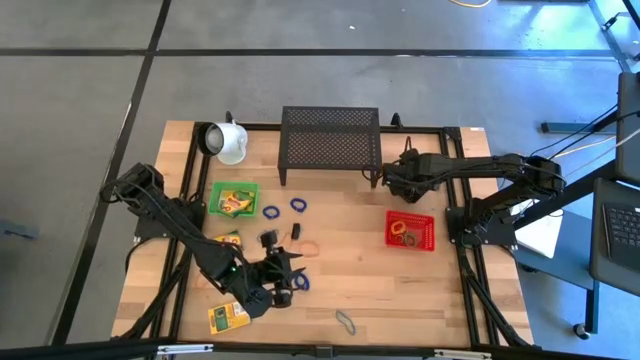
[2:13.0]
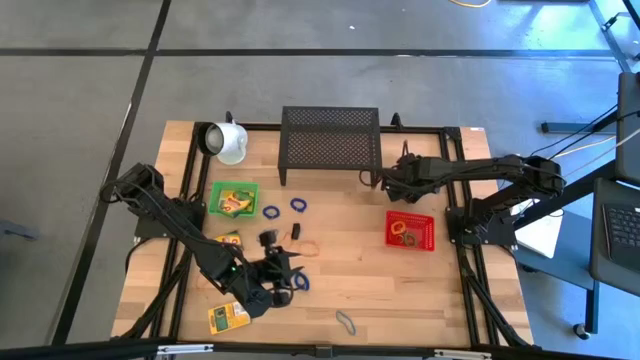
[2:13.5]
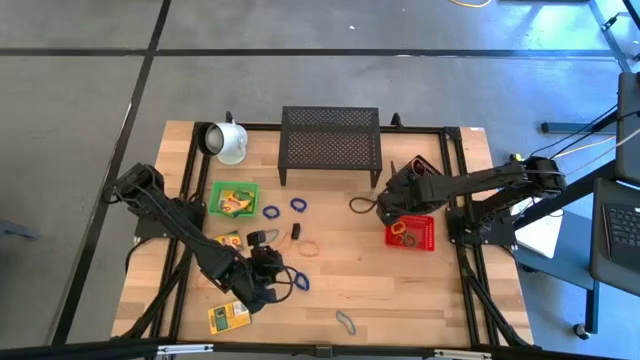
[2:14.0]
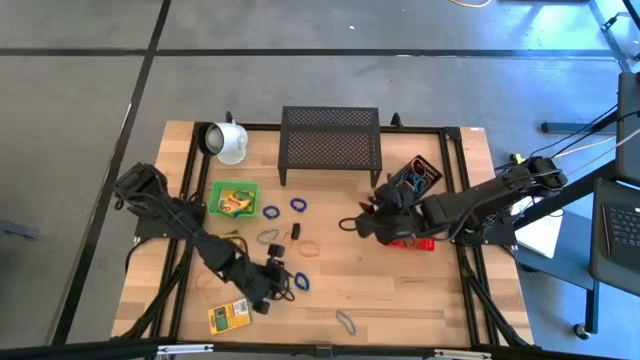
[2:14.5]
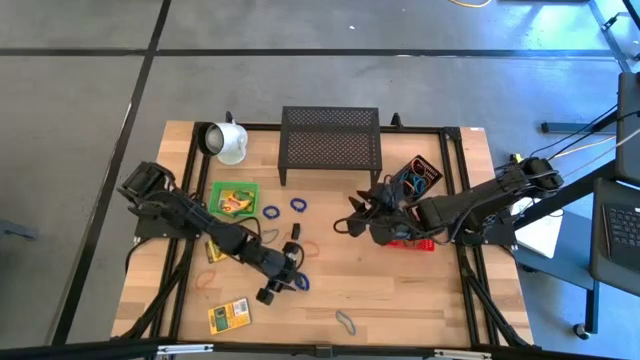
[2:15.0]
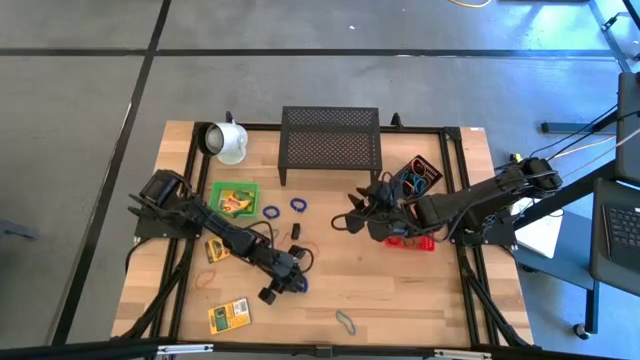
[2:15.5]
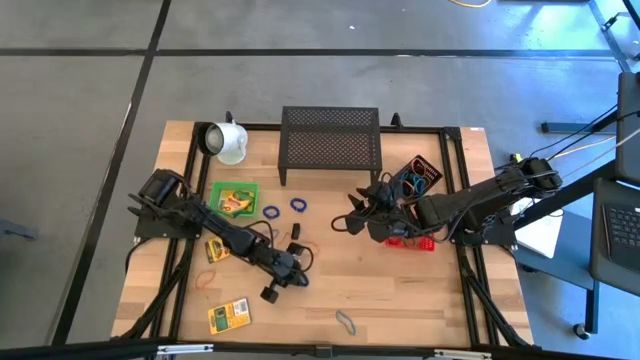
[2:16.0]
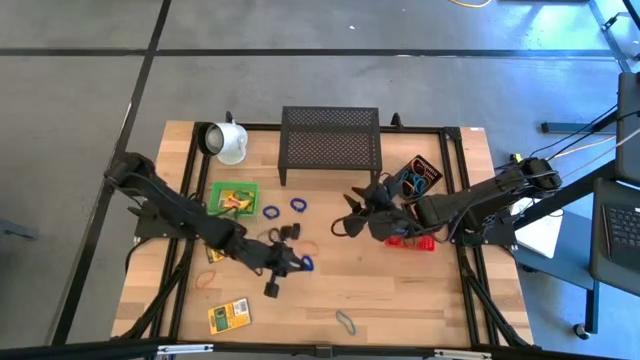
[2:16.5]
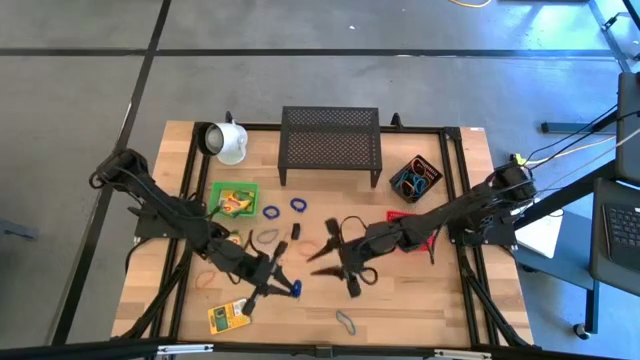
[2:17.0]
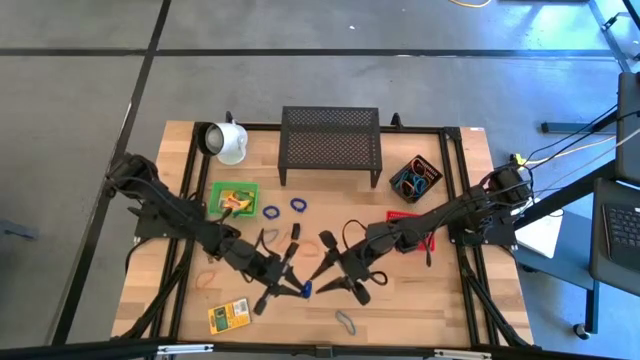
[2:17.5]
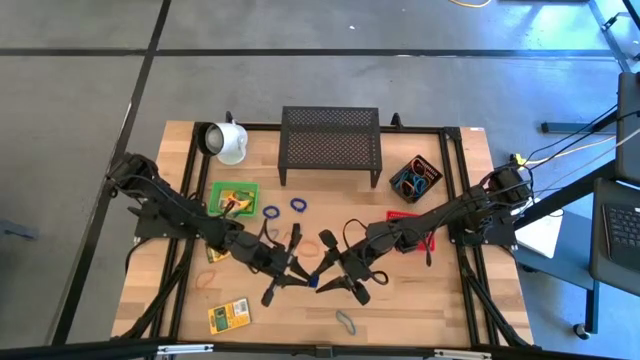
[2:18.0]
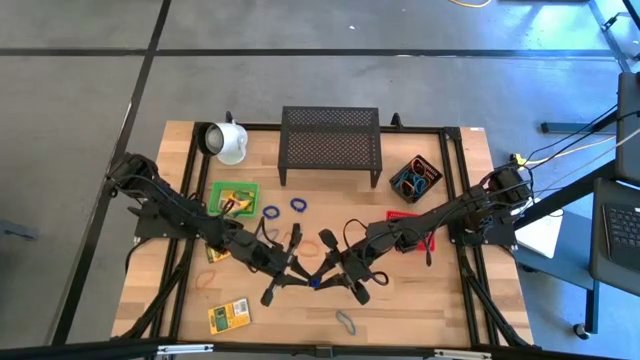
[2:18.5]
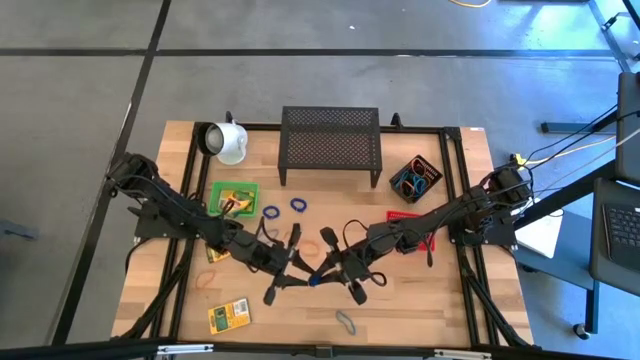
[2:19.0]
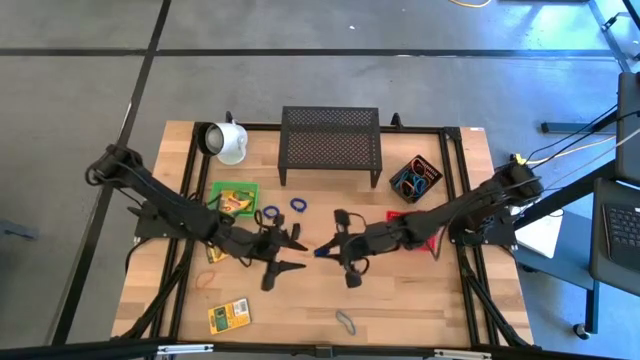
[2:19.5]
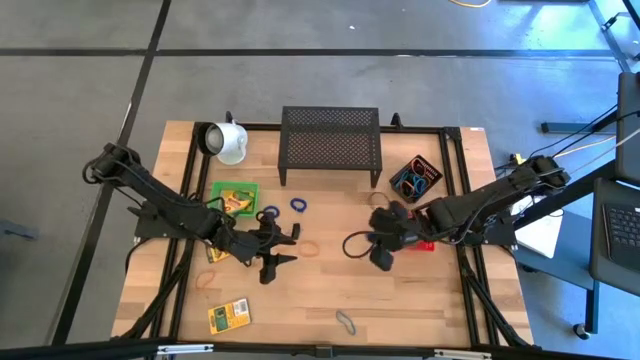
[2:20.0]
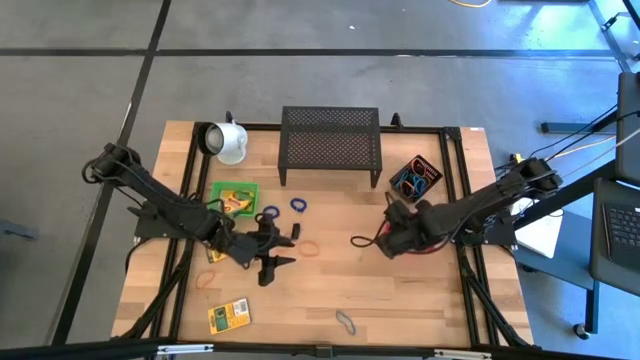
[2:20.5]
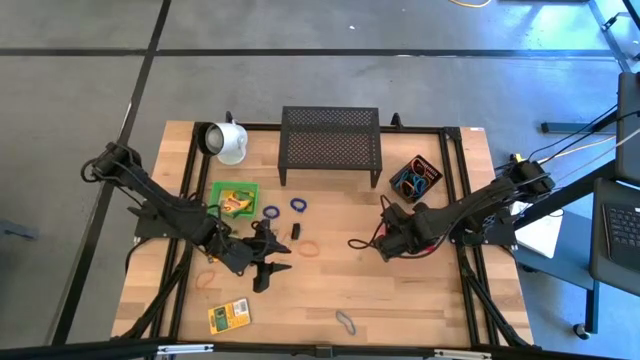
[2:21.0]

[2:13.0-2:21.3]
Task: Pick & Place Office Desk Supplies
Put the blue spring keychain into the orange bin

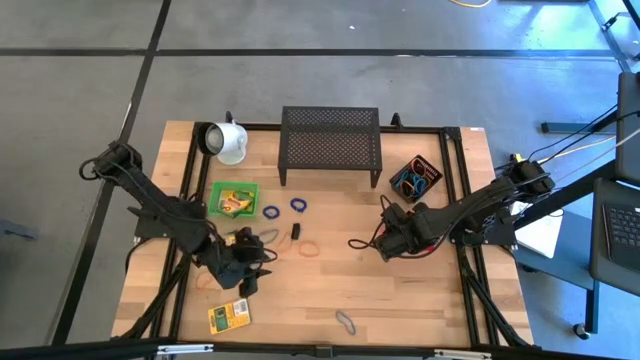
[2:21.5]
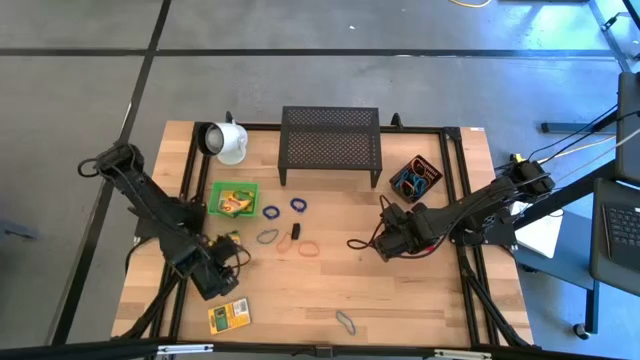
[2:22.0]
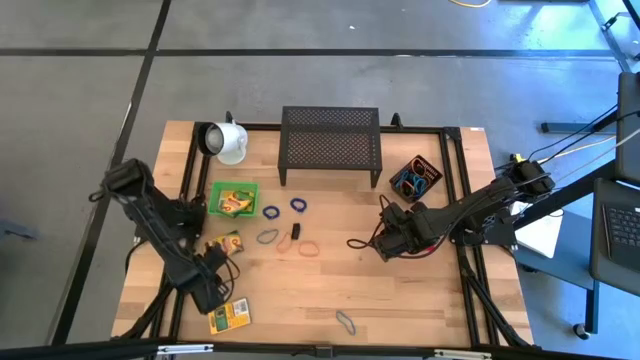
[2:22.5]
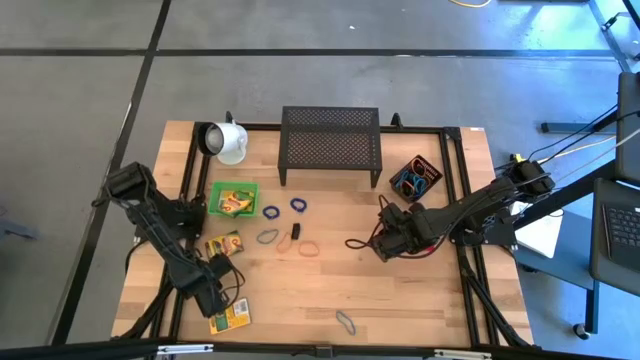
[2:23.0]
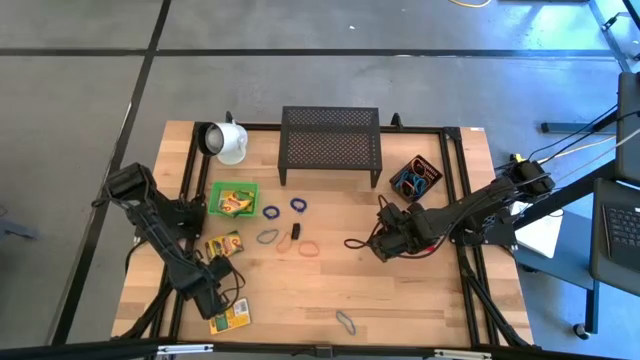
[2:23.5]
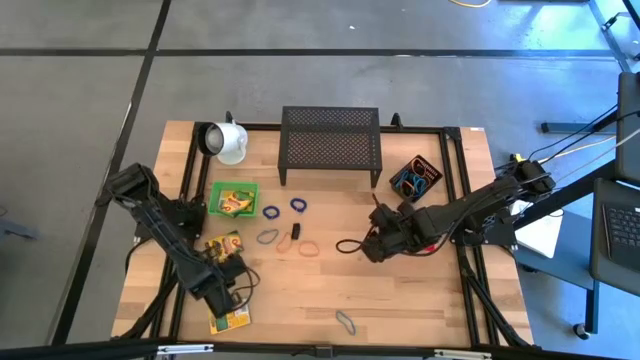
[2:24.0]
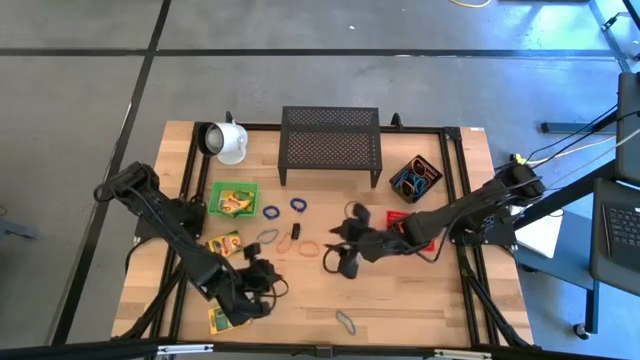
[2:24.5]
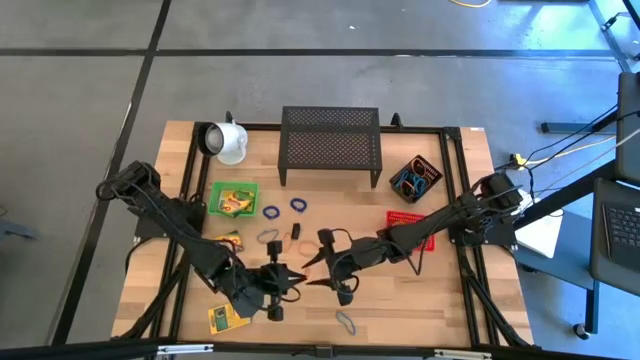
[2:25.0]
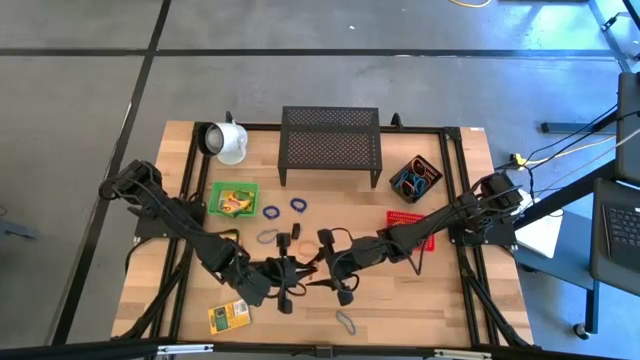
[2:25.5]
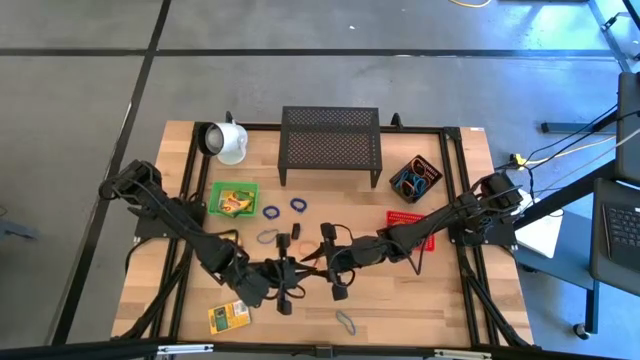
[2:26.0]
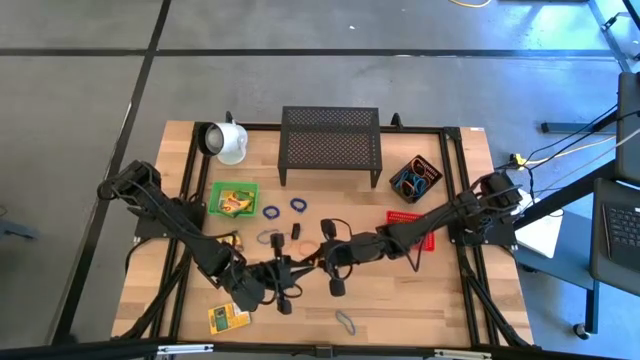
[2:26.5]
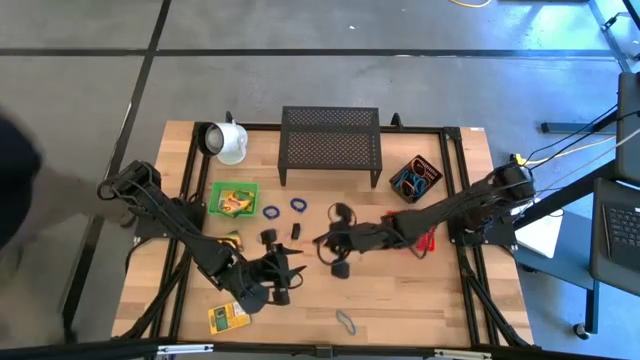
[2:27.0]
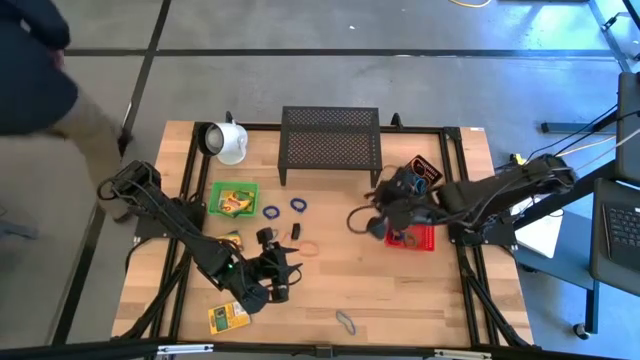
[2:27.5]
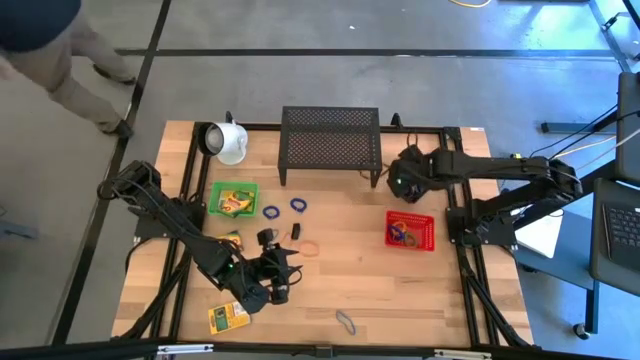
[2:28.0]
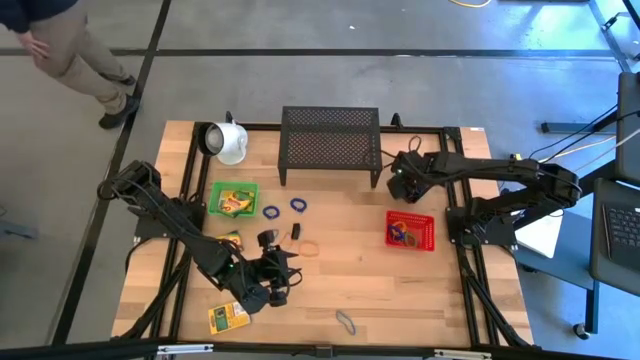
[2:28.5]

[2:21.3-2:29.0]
Put the orange rubber band into the black bin

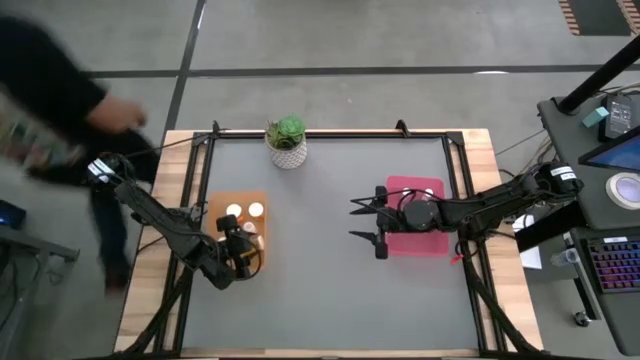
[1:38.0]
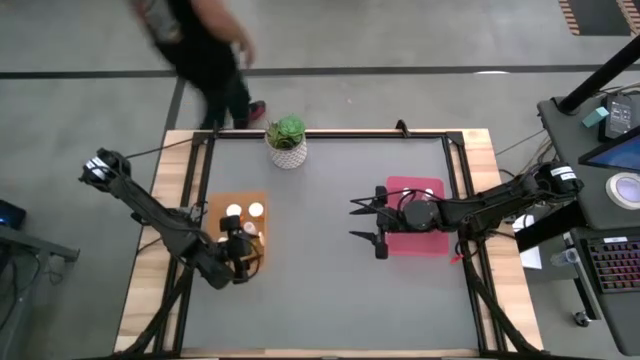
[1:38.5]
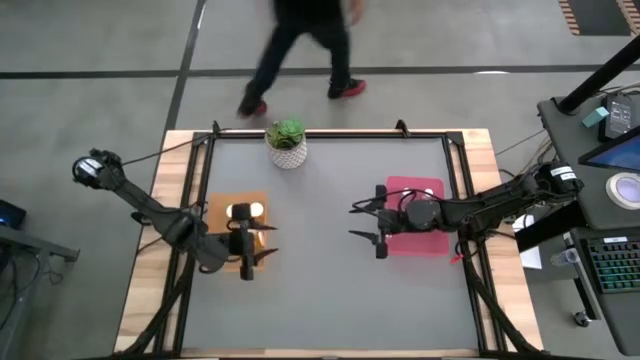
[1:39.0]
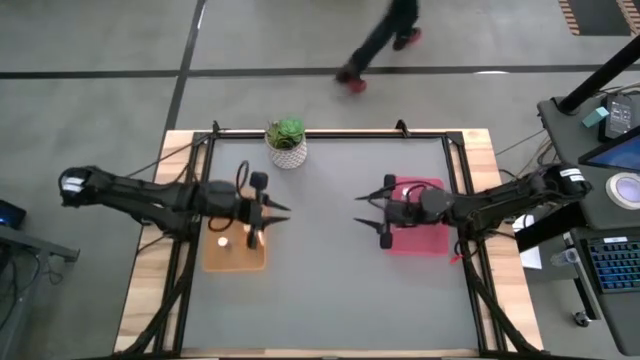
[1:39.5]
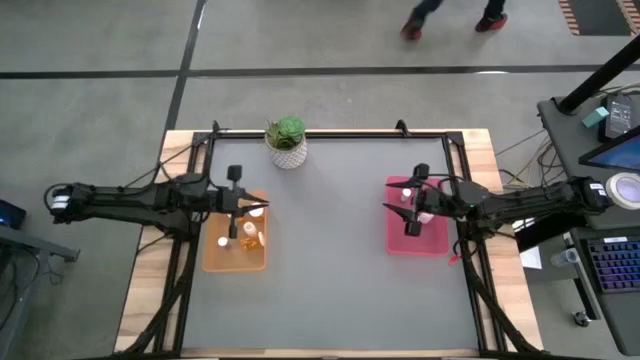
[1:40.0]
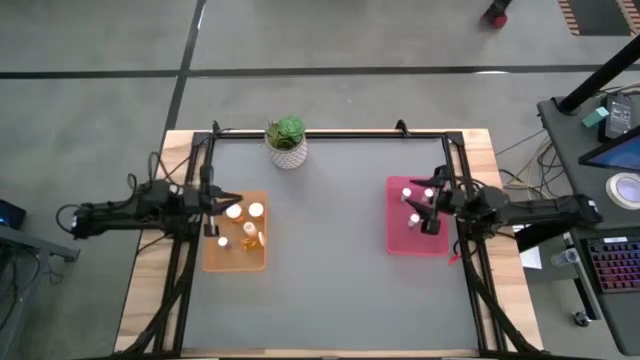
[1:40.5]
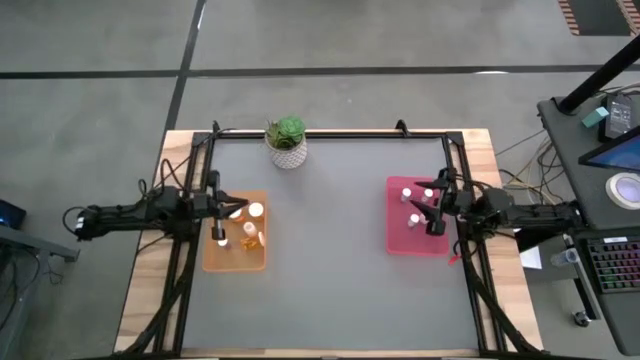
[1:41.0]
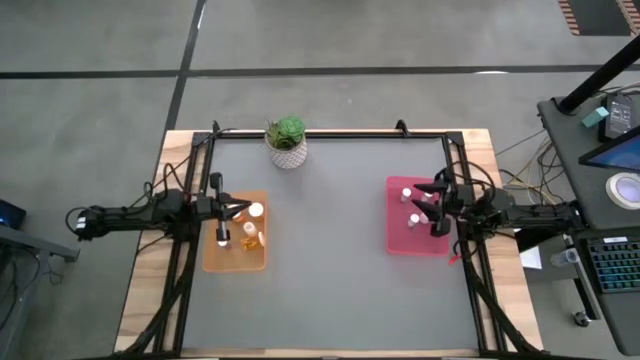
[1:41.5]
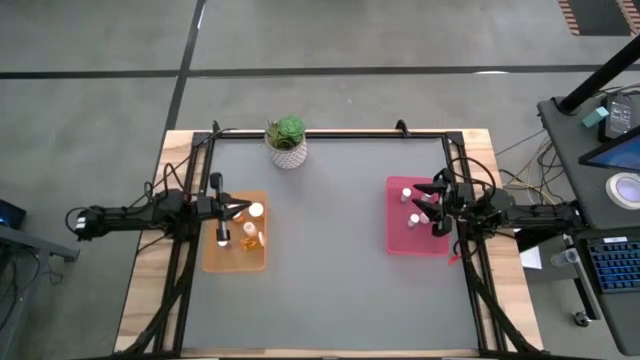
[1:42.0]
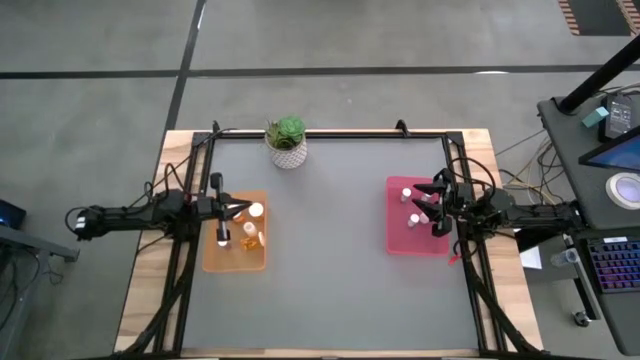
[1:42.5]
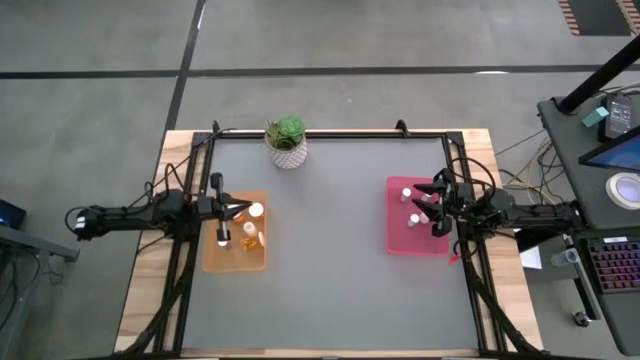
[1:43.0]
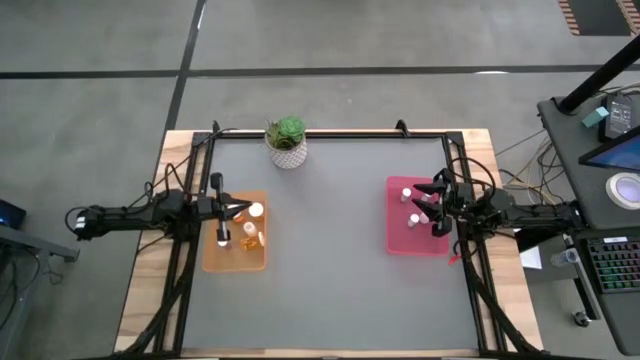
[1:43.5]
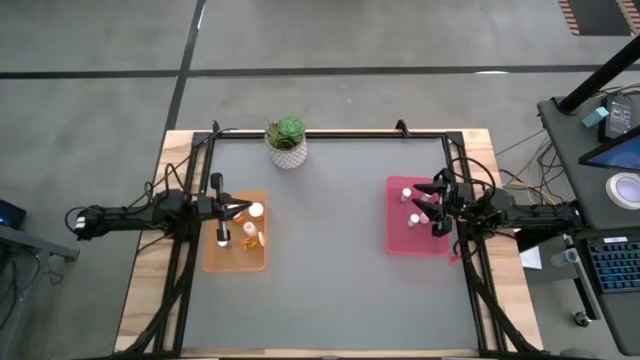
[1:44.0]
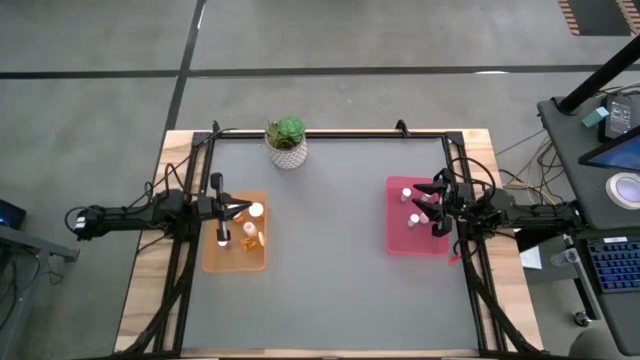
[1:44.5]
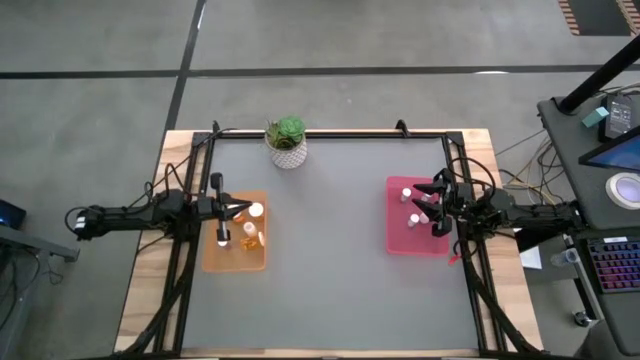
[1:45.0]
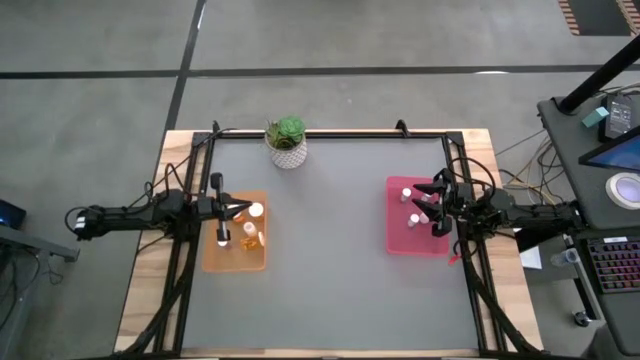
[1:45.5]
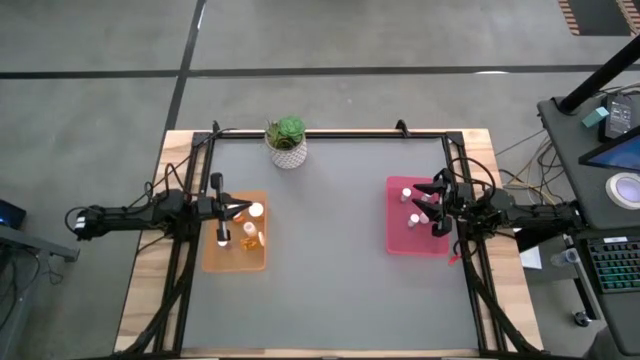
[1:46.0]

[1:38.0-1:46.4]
Task: Pick and place medicine bottles into bin by pill shape (circle, oval)
Return to Home Position
